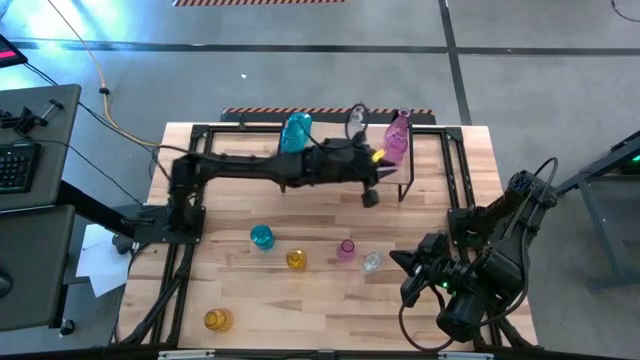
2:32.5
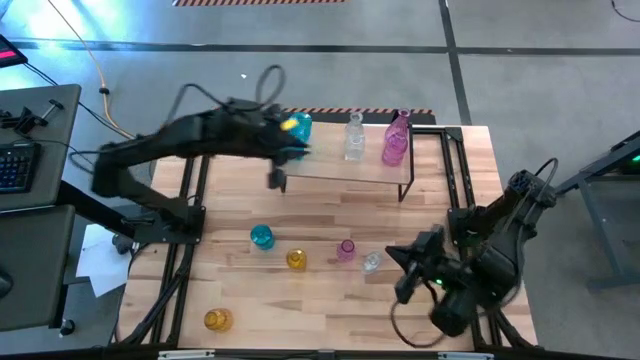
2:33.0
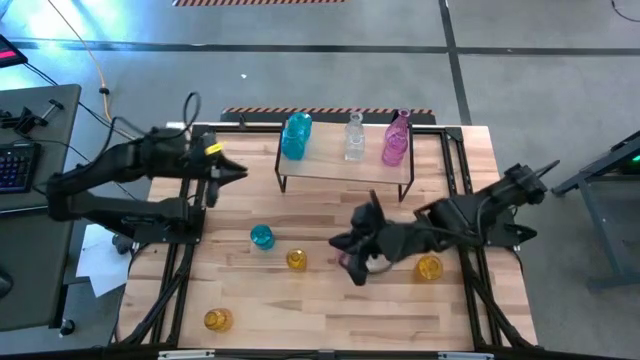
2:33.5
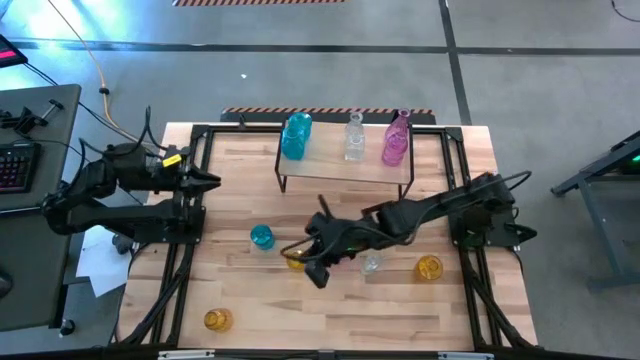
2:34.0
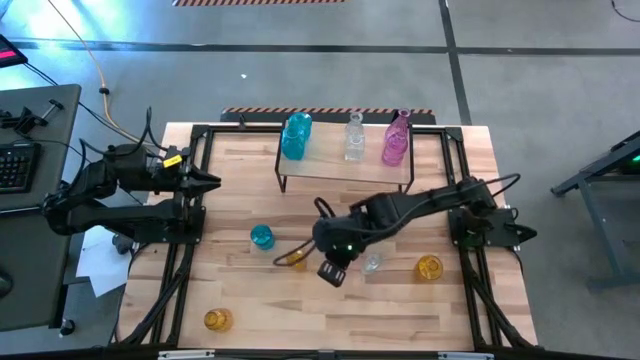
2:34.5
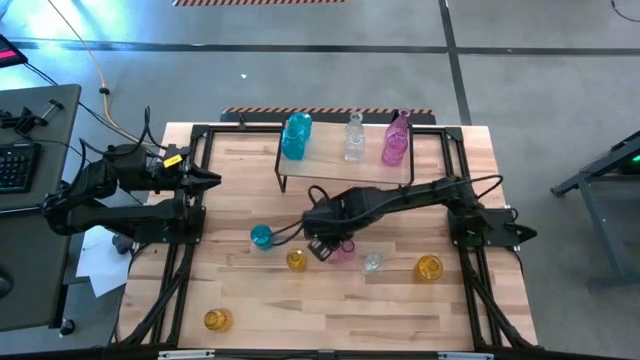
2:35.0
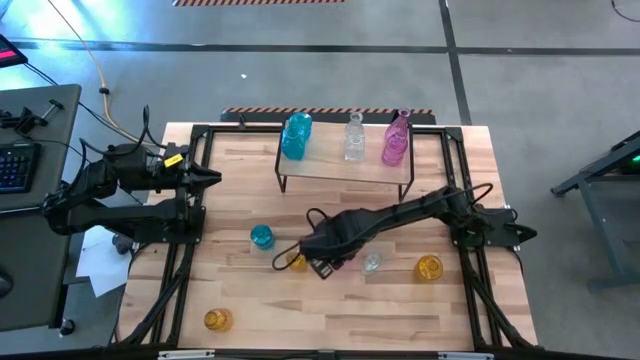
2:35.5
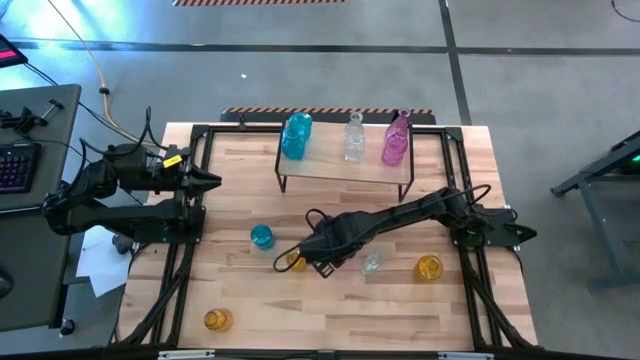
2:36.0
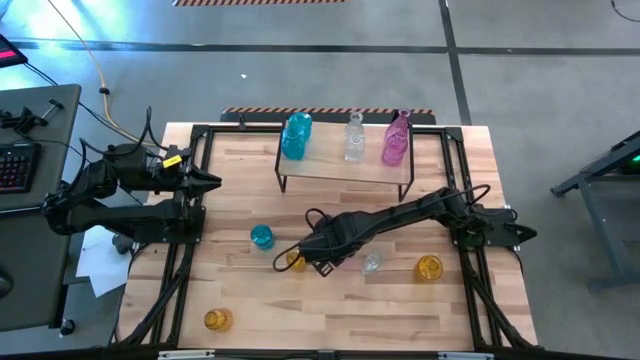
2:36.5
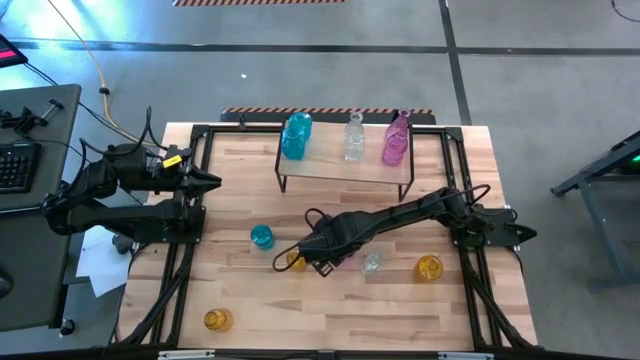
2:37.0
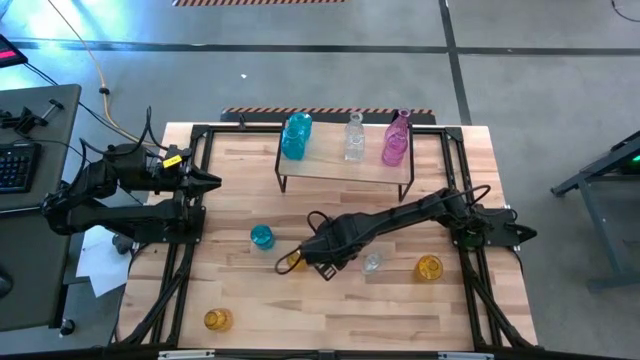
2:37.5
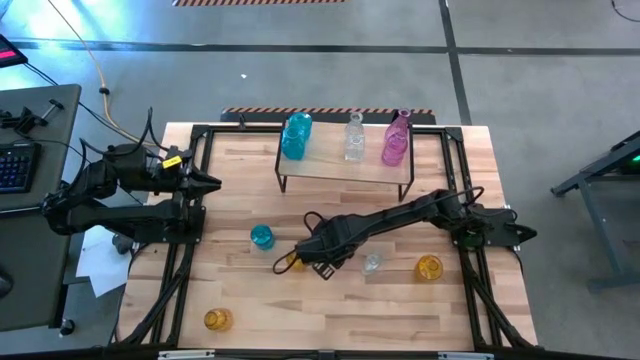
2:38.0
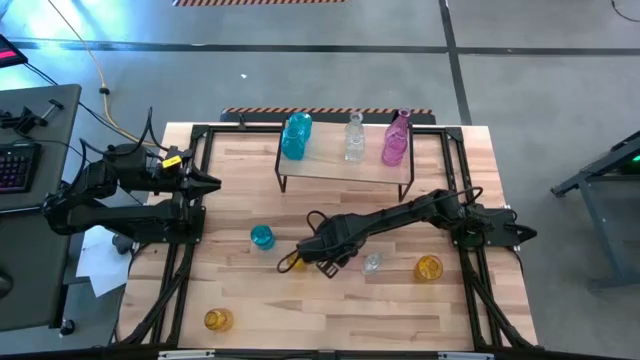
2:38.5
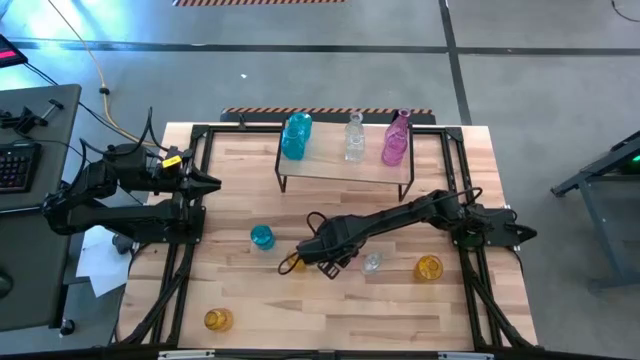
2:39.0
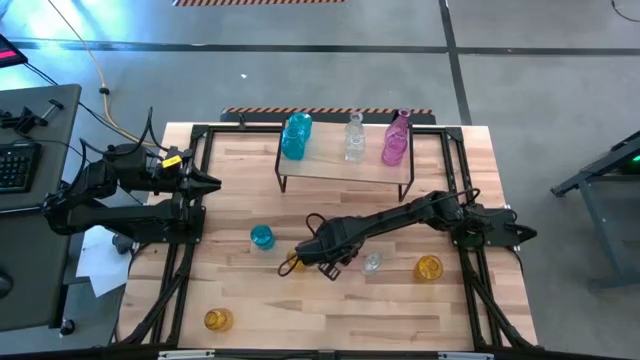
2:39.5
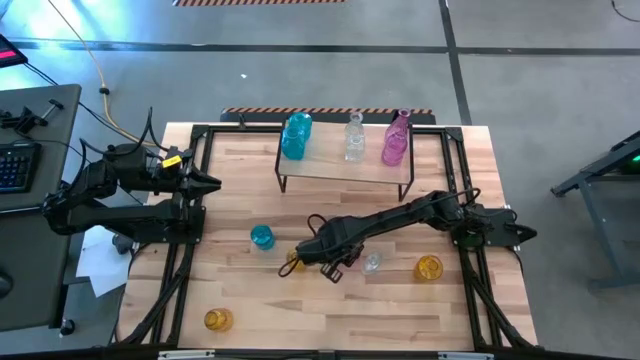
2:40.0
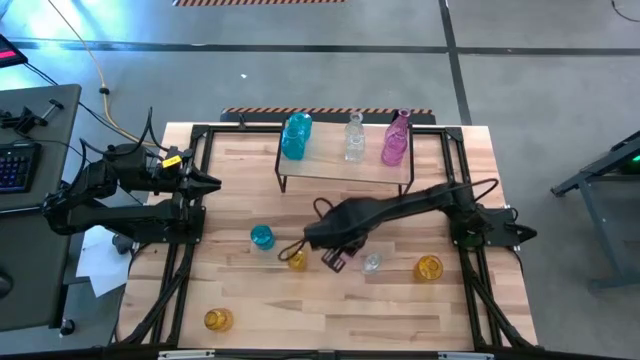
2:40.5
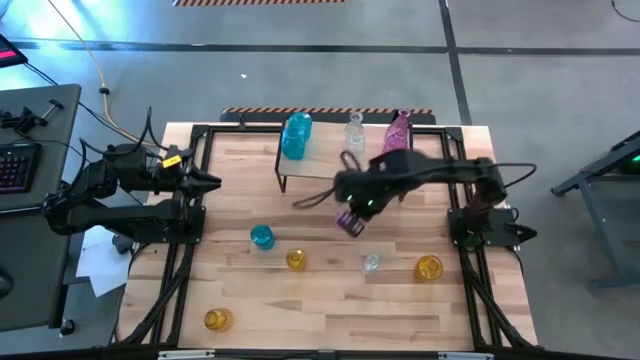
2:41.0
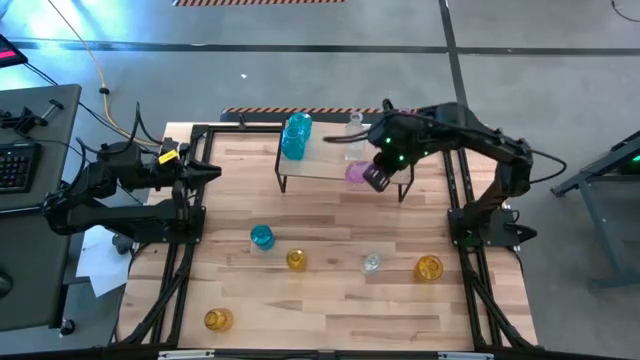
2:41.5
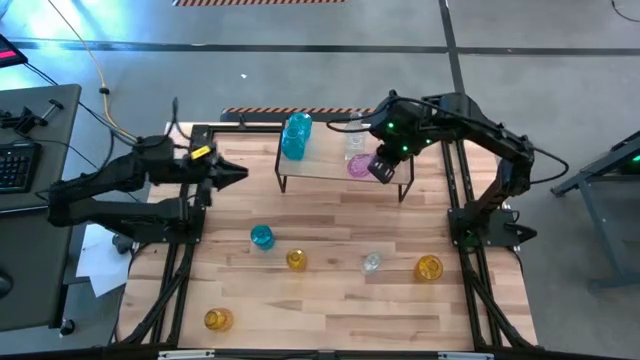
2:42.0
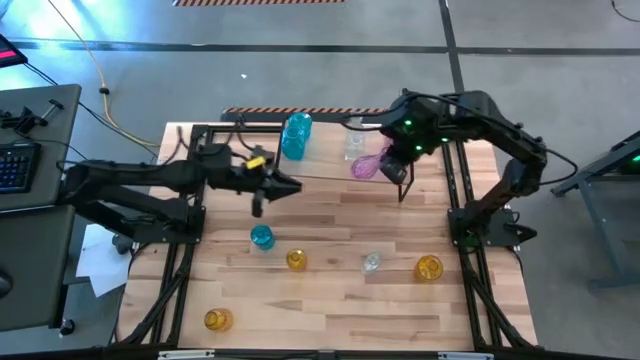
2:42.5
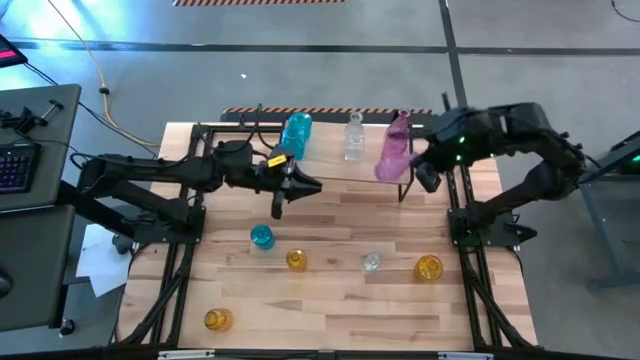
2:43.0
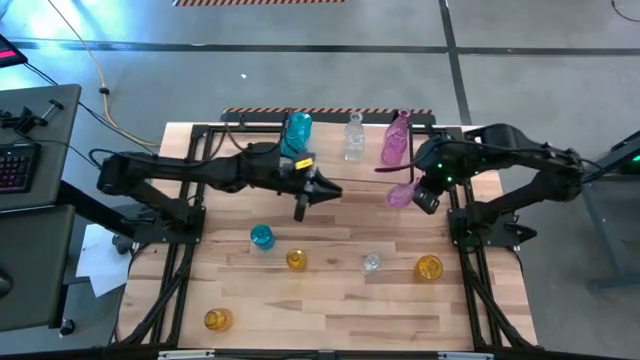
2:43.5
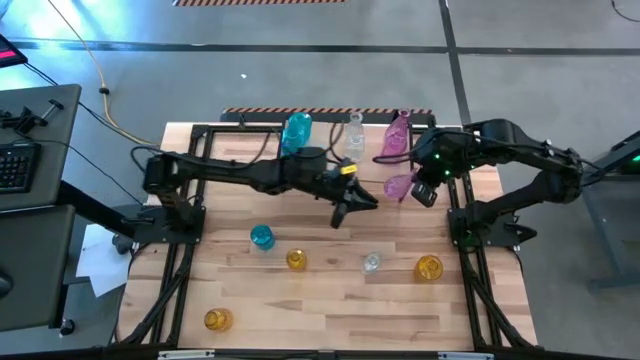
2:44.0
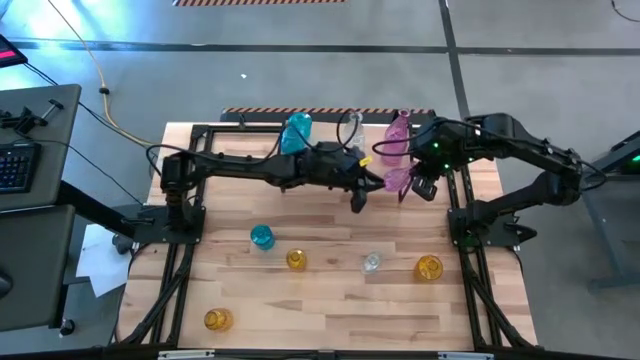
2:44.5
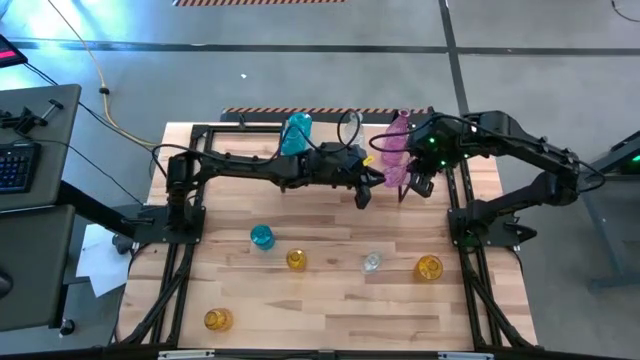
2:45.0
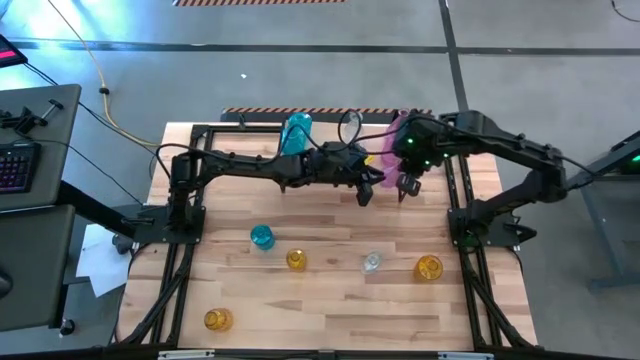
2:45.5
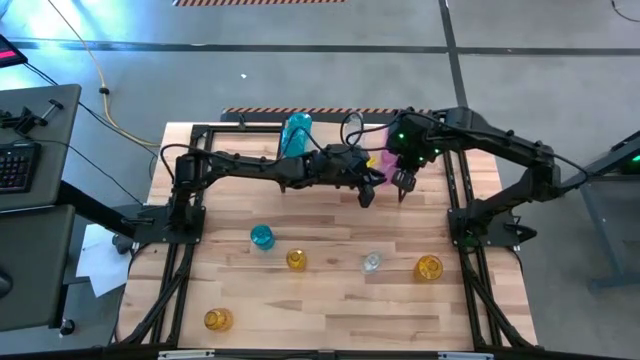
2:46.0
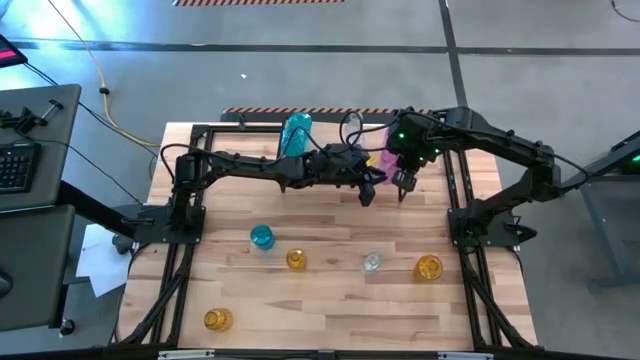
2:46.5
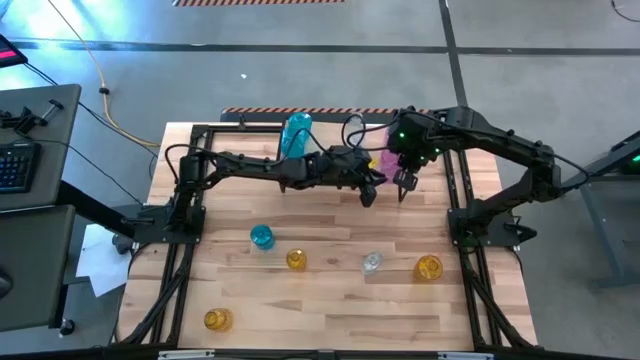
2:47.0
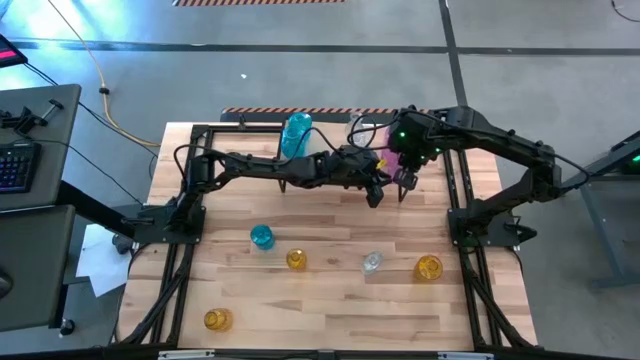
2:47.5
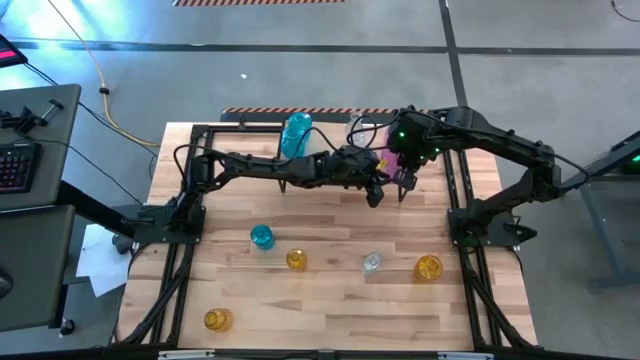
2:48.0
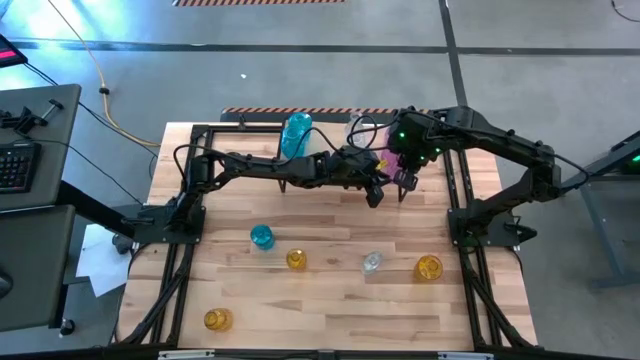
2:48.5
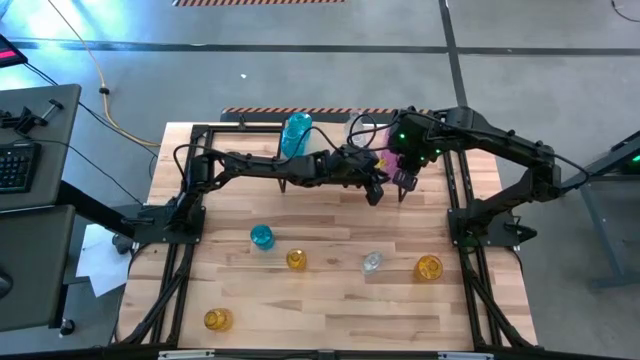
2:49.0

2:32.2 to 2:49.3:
Task: sort vases onto shelf
Put the purple transparent vase on the shelf aligned with the other purple vases

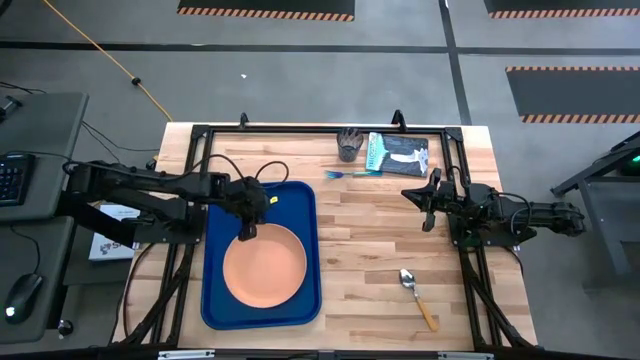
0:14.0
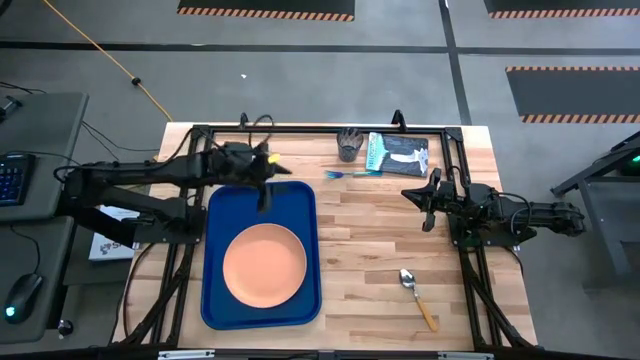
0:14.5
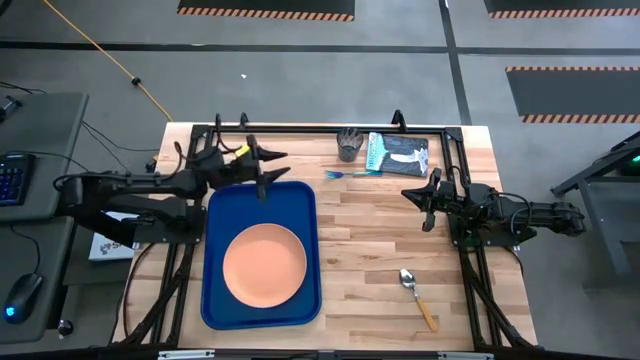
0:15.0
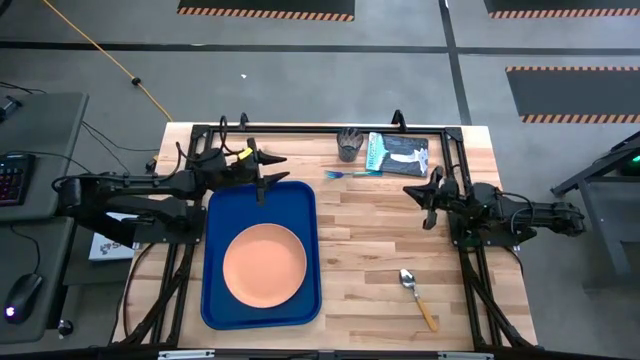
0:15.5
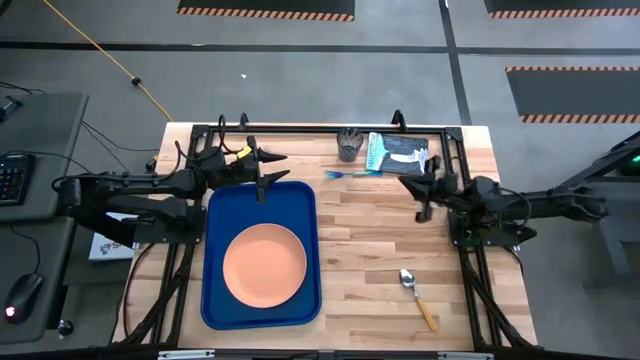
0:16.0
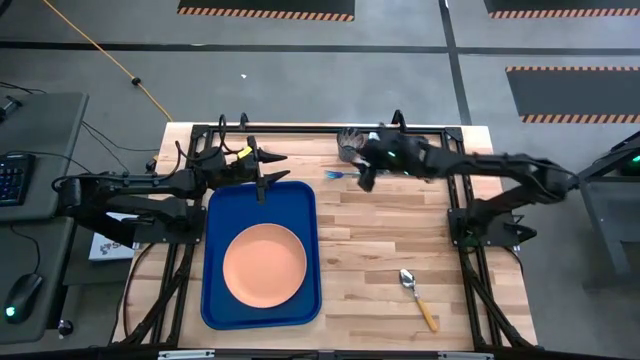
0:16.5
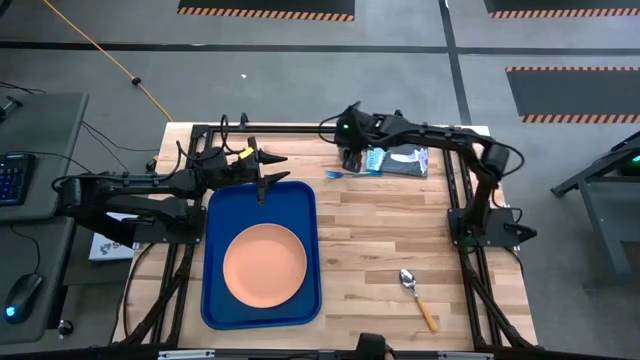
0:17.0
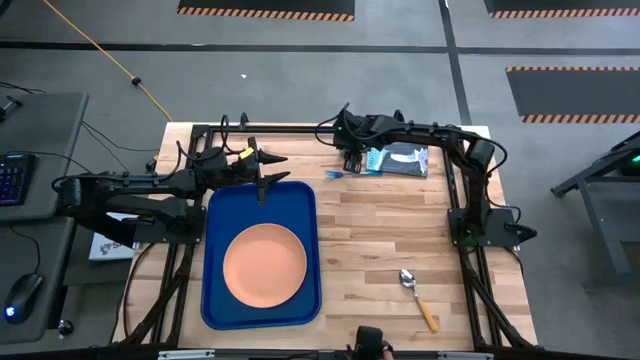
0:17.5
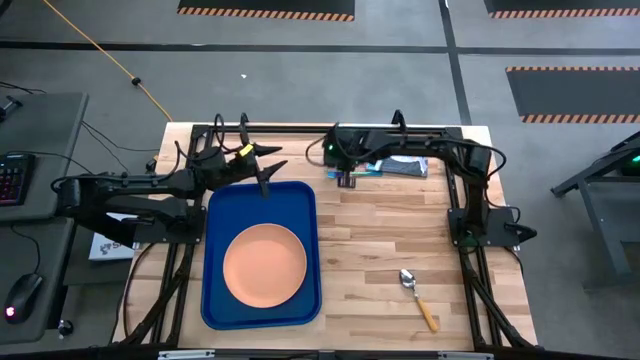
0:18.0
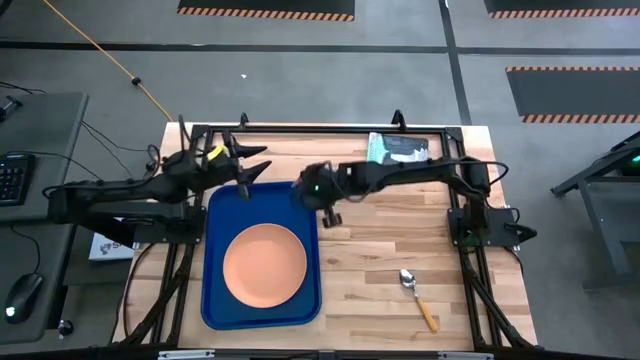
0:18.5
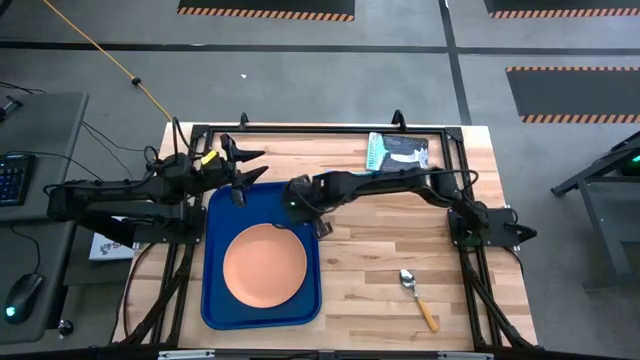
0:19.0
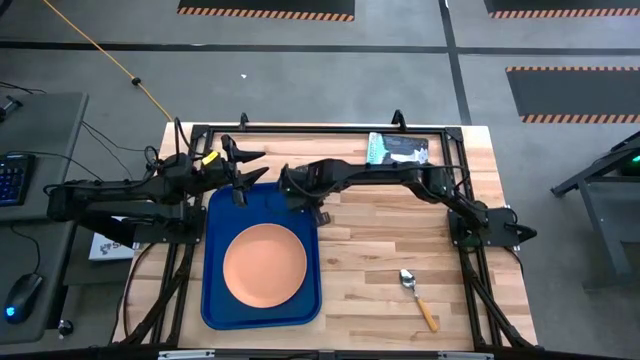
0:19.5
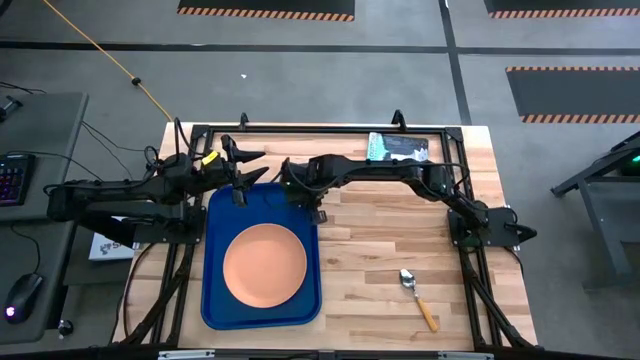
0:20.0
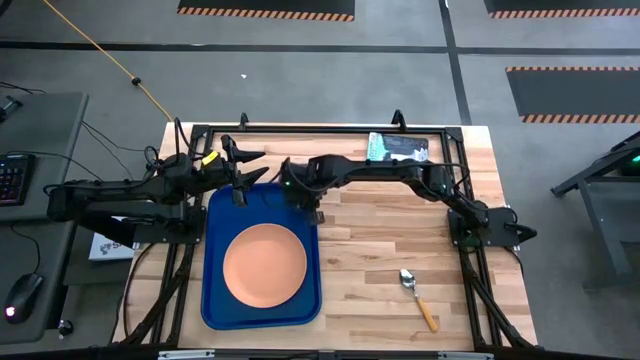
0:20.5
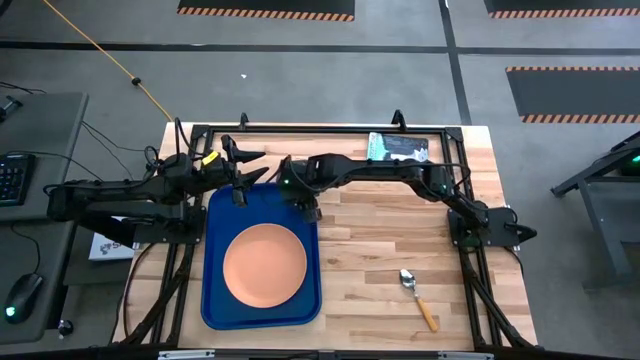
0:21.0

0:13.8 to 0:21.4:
Task: Pick and place plate/cup/fork/spoon on tray
Put the blue glass on the top right of the blue tray
